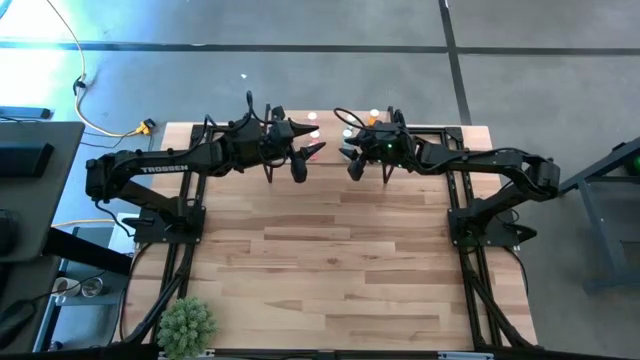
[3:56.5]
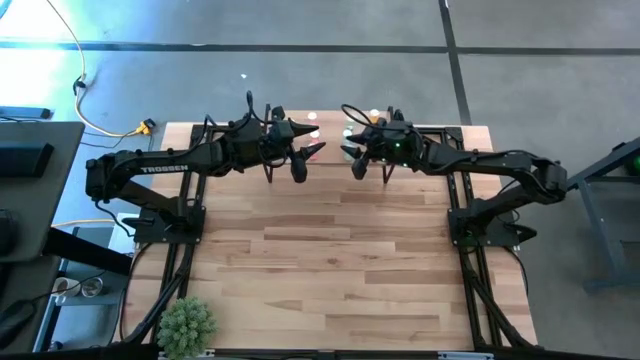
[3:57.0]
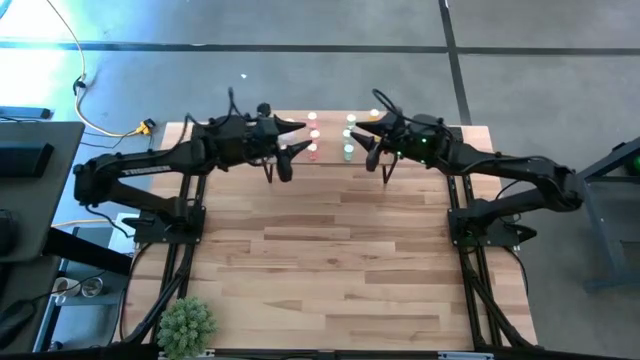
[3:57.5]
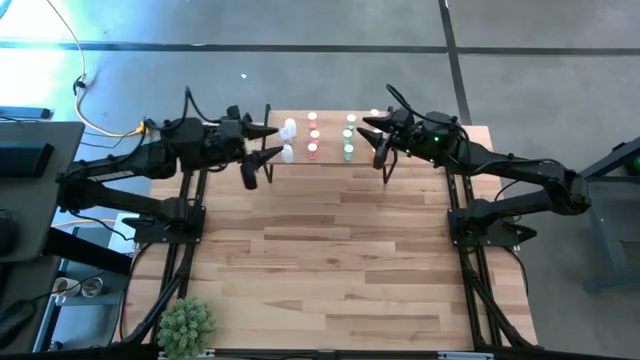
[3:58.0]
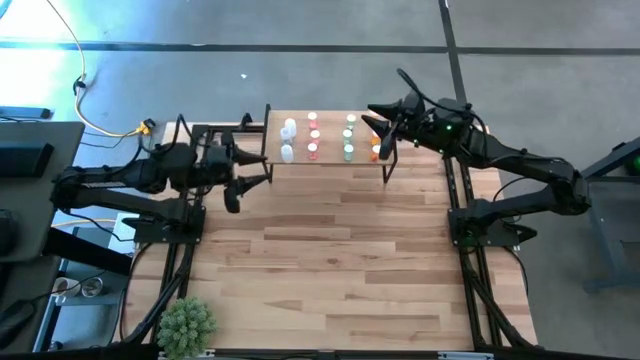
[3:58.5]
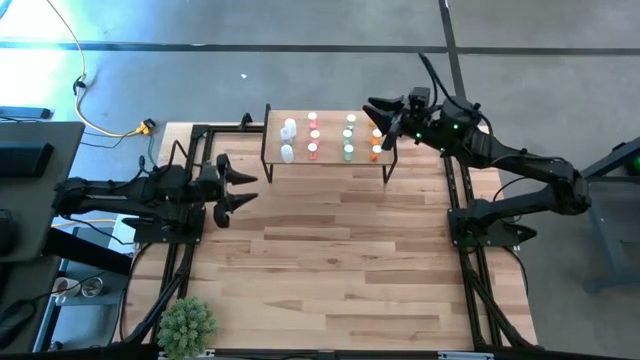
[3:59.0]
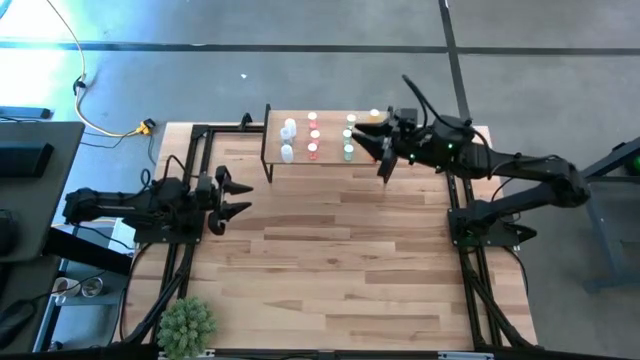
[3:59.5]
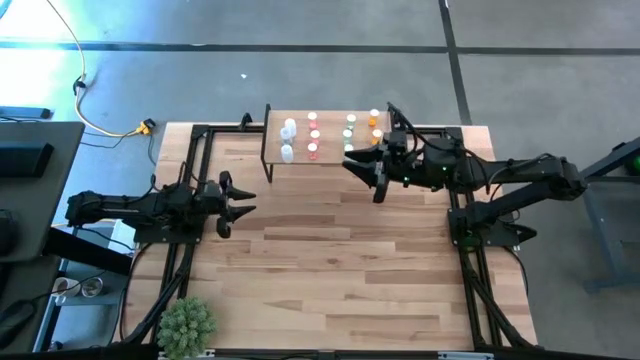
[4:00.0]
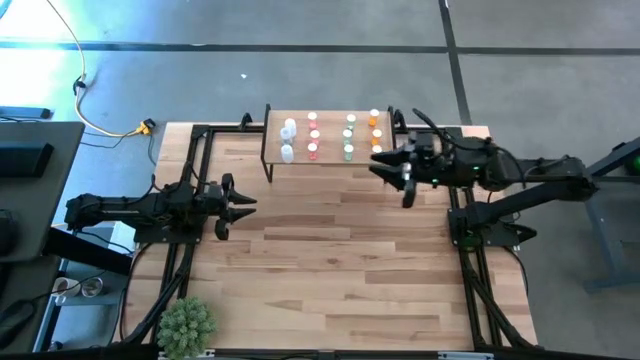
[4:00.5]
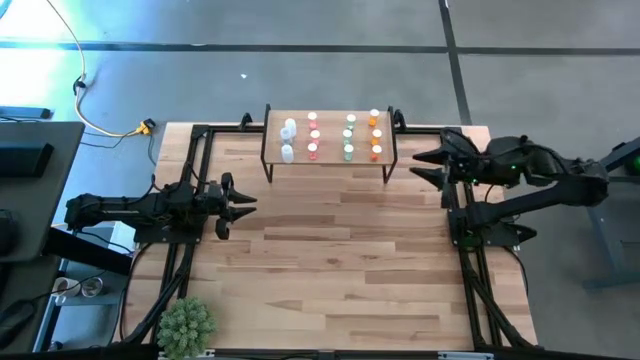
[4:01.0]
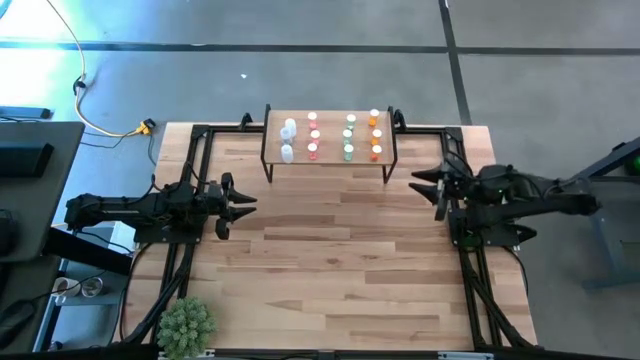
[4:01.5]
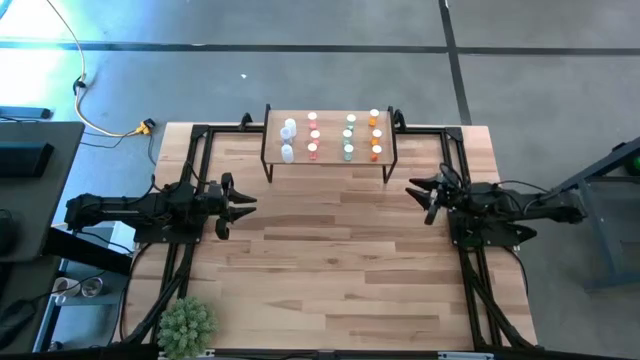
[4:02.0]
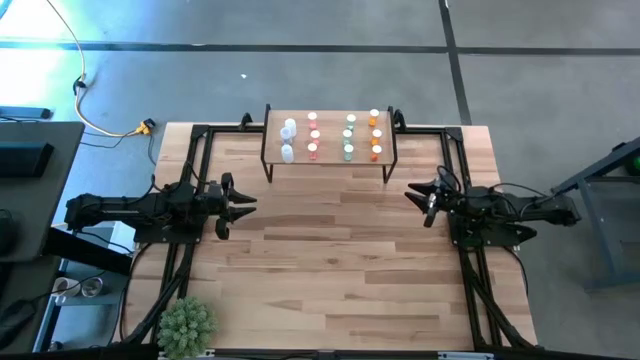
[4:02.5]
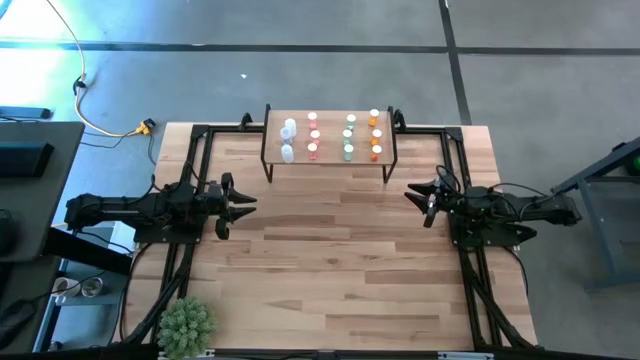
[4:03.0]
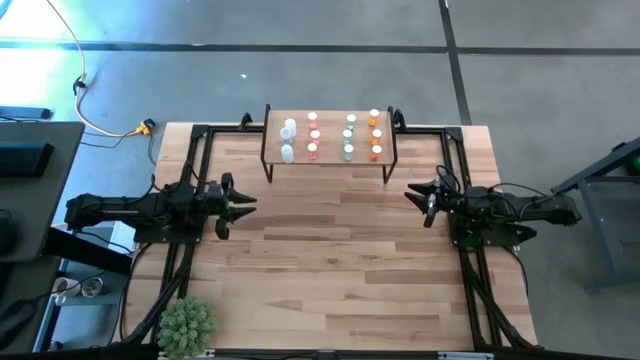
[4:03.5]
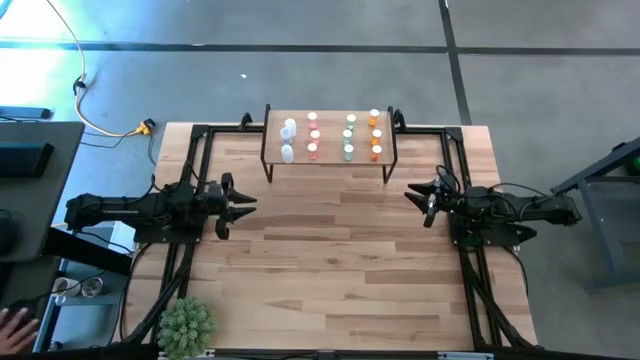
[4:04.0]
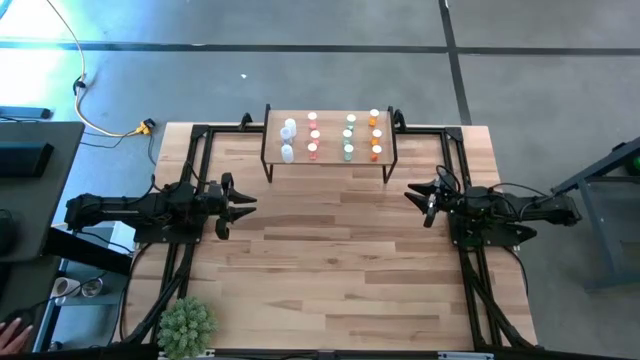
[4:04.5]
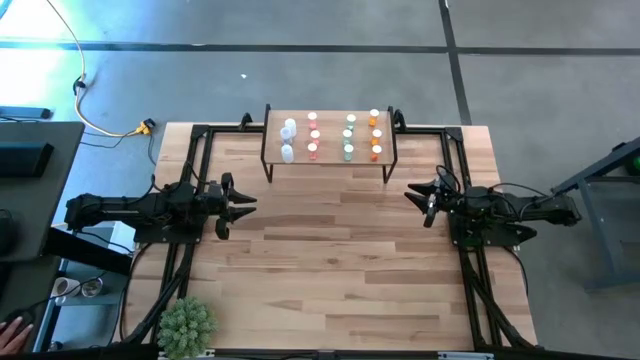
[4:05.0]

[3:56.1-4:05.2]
Task: Pick and place medicine bottles onto shelf by color
Return to Home Position

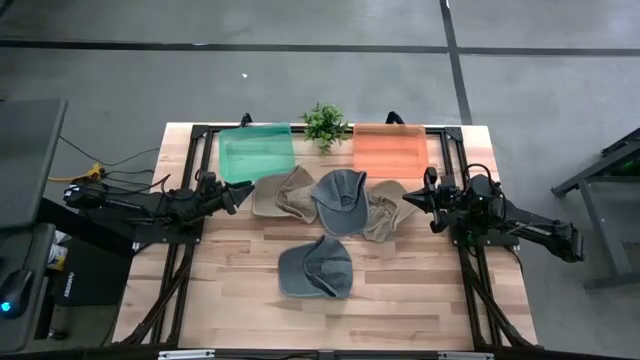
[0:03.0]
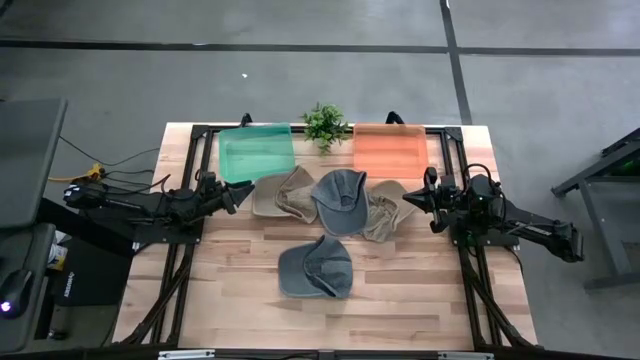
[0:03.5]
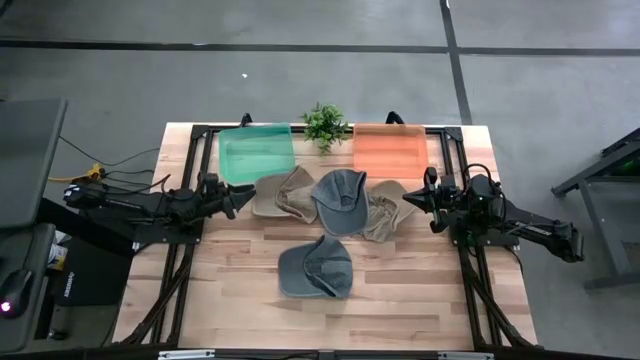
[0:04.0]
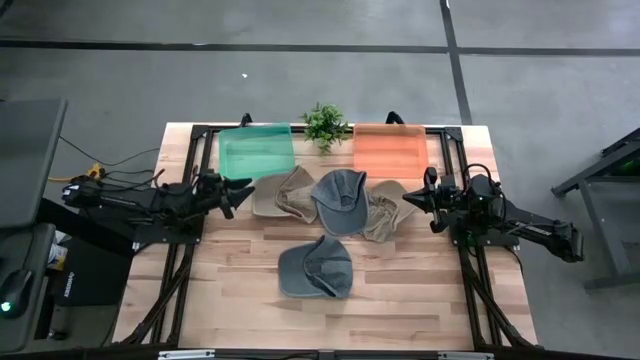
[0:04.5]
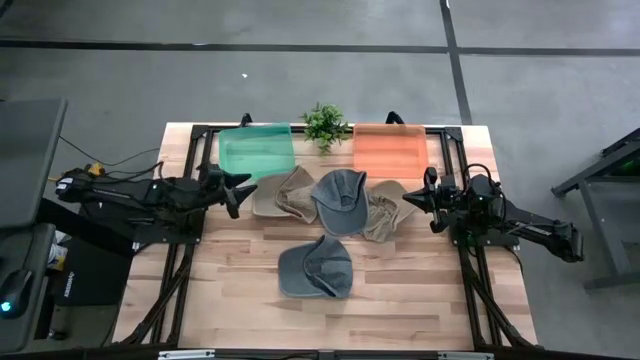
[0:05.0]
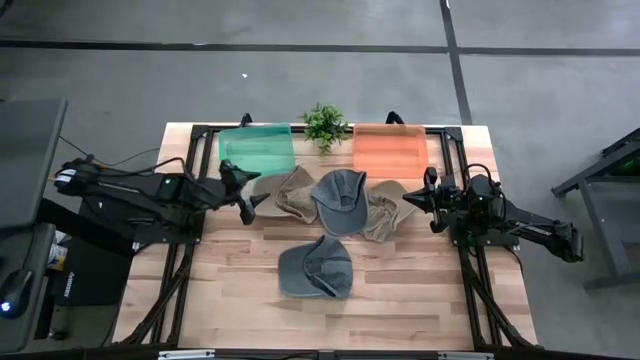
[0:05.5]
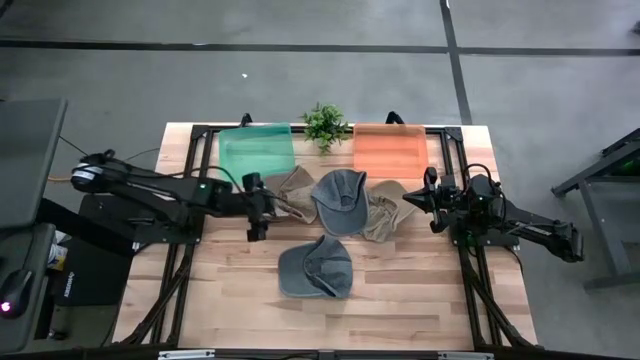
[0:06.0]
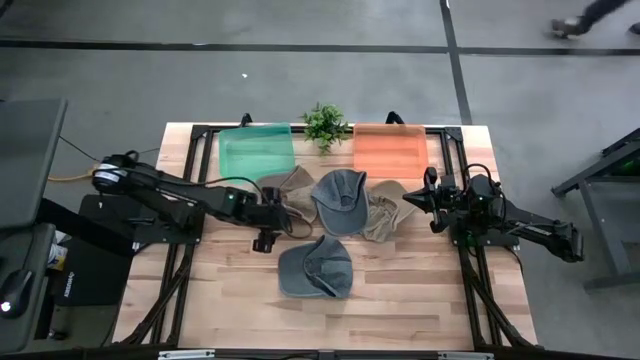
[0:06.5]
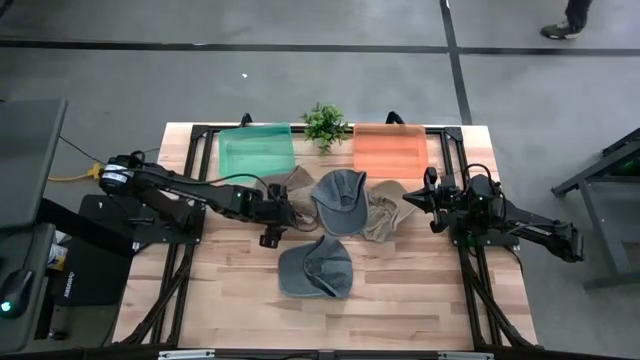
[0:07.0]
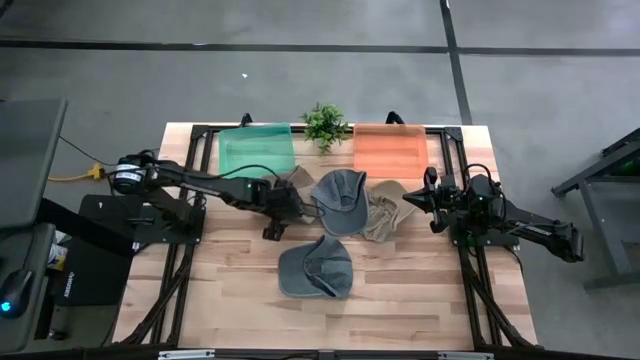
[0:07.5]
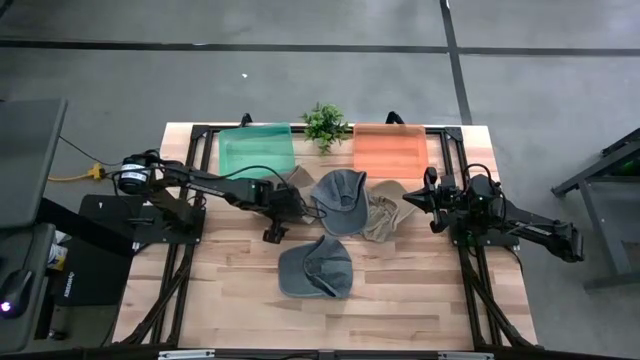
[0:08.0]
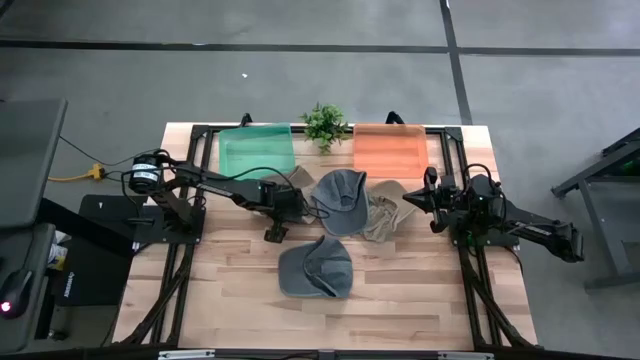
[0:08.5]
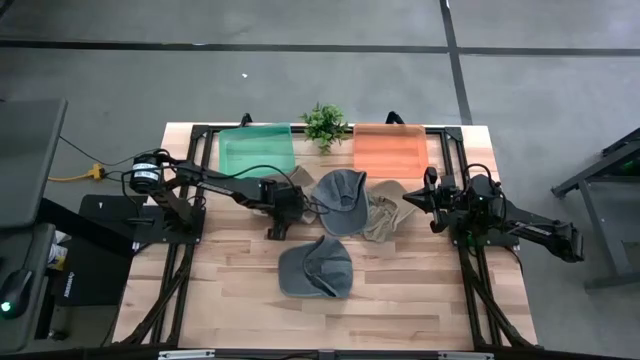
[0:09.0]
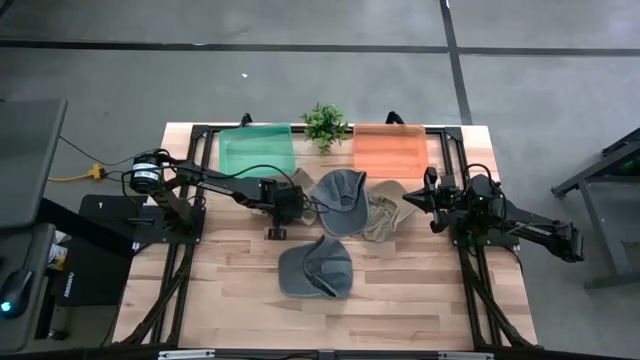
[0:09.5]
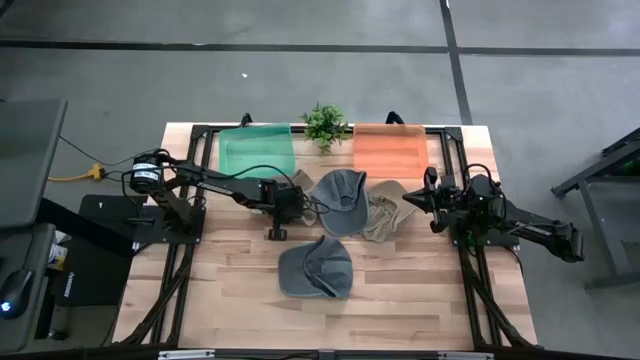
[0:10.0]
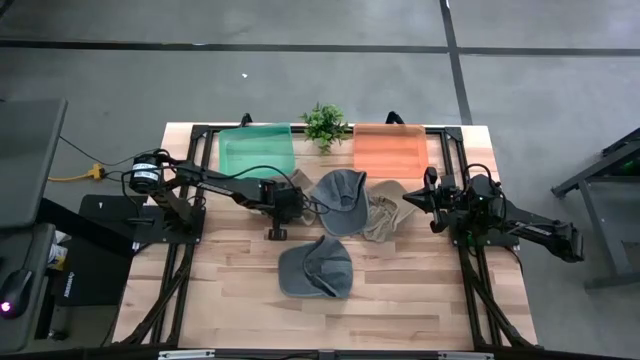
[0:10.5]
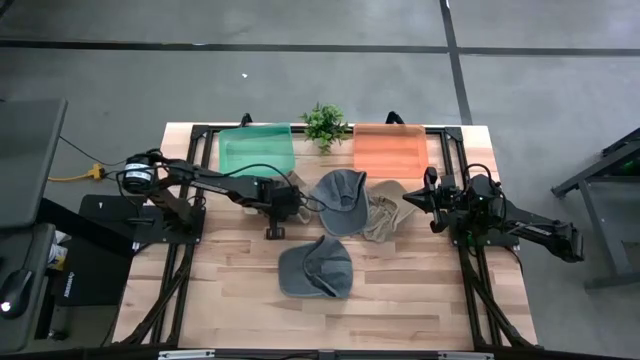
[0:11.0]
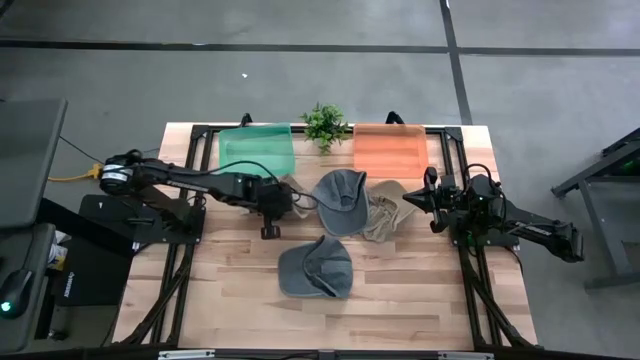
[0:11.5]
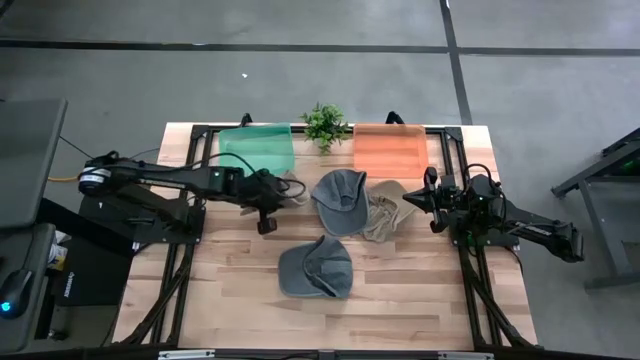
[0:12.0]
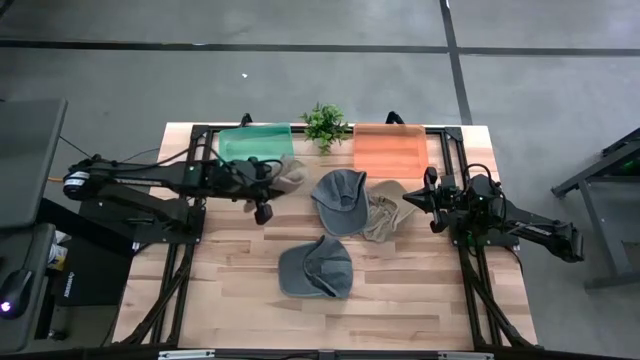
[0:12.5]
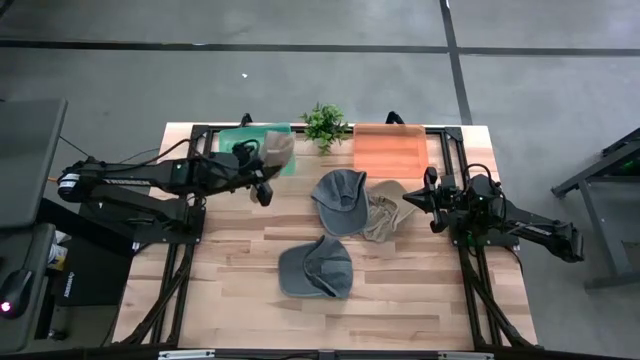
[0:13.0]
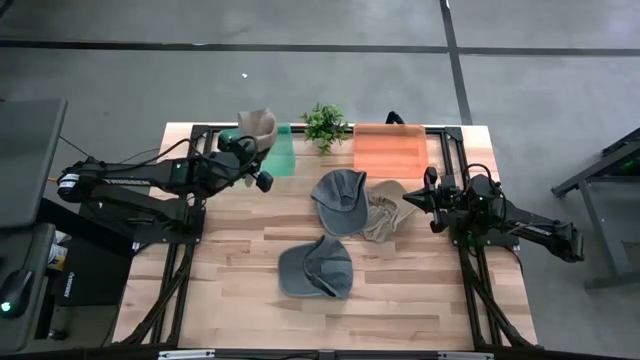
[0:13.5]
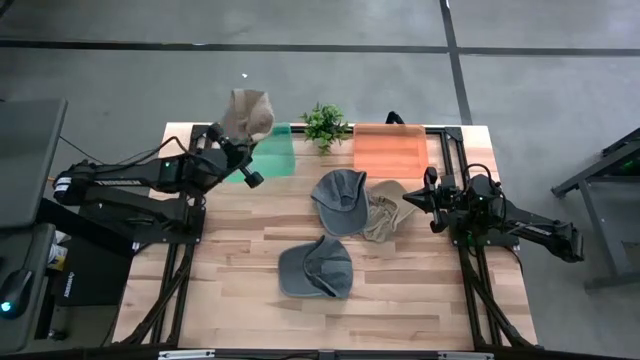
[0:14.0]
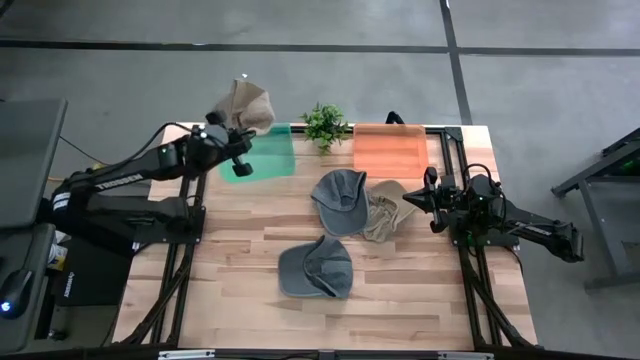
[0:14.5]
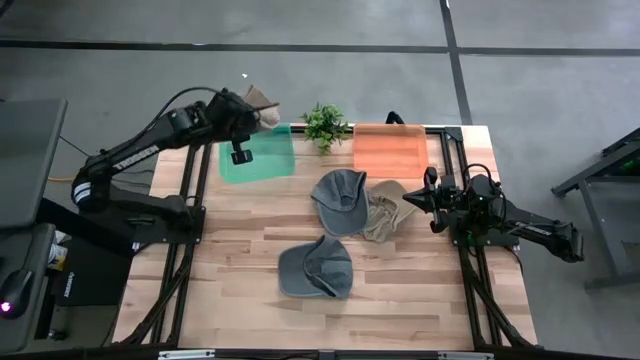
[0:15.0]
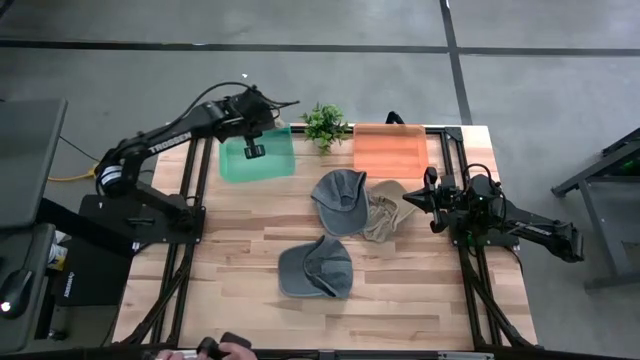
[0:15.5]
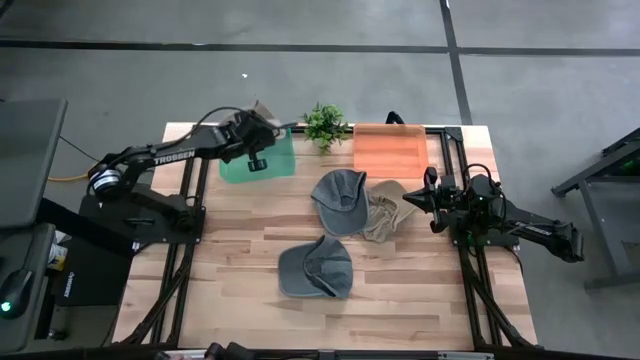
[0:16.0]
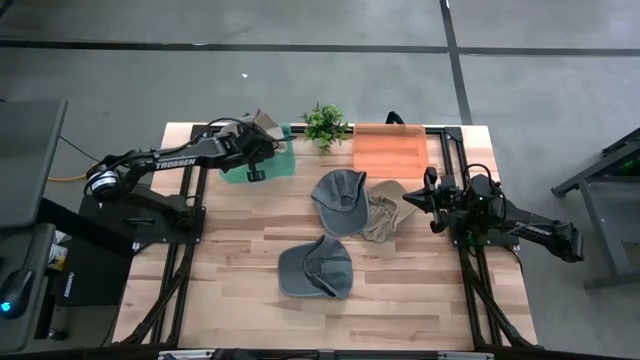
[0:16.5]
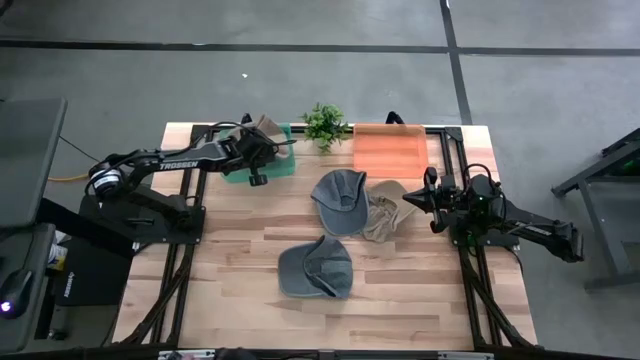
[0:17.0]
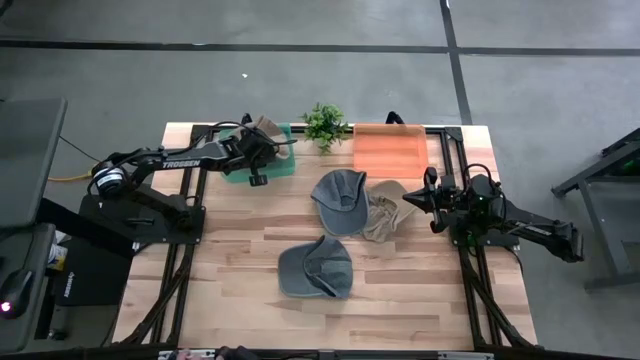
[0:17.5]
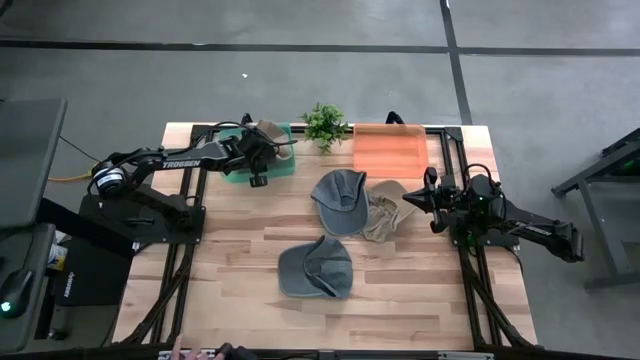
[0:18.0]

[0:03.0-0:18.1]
Task: Pick & Place hat
Put the left brown cap into the blue bin
